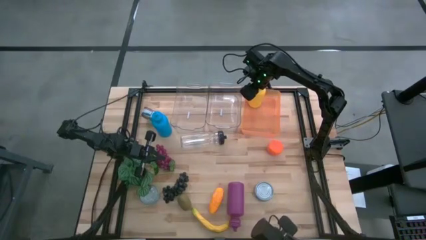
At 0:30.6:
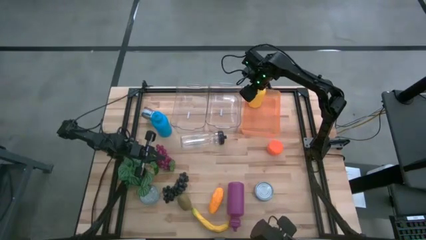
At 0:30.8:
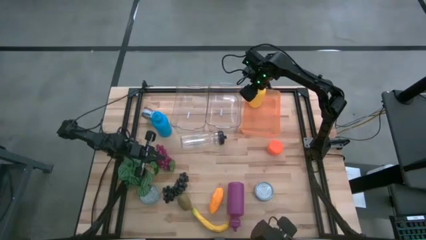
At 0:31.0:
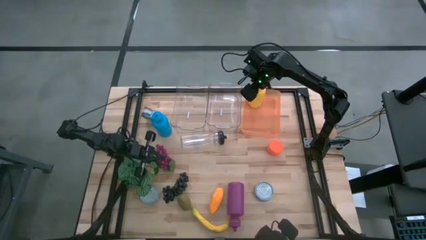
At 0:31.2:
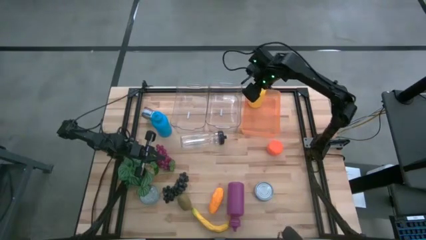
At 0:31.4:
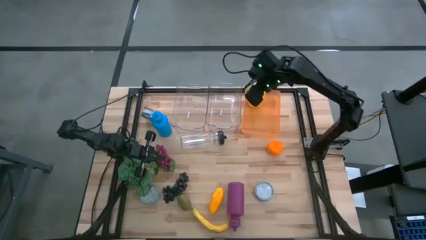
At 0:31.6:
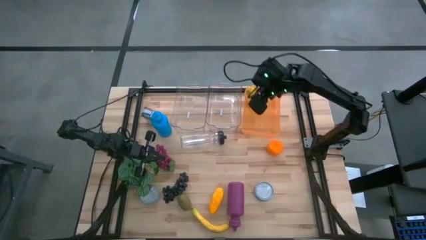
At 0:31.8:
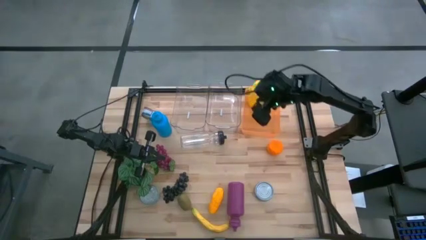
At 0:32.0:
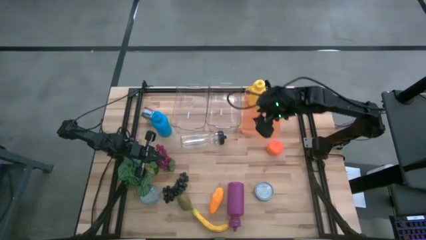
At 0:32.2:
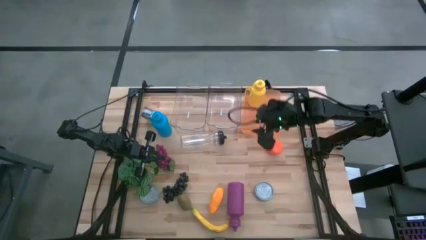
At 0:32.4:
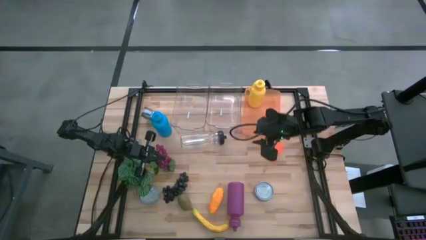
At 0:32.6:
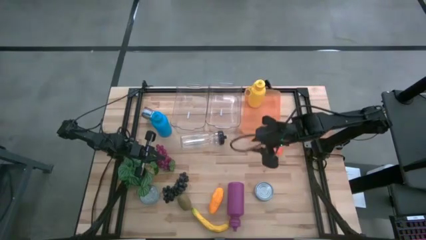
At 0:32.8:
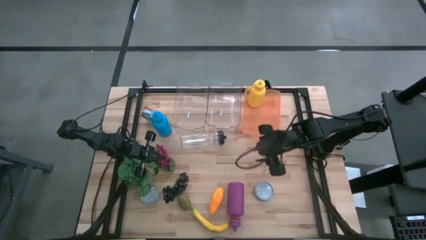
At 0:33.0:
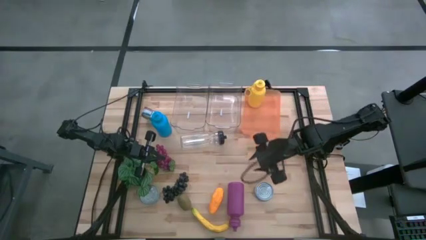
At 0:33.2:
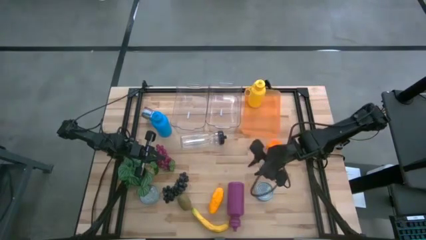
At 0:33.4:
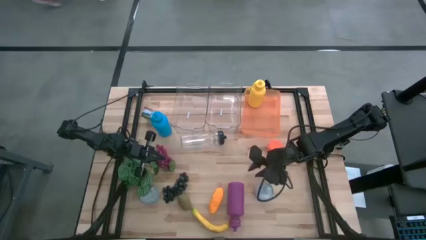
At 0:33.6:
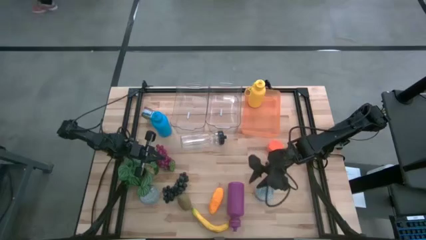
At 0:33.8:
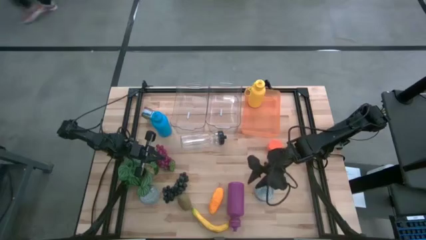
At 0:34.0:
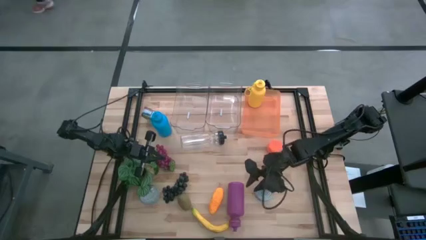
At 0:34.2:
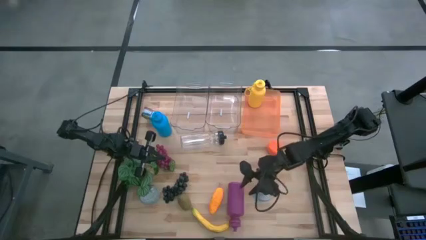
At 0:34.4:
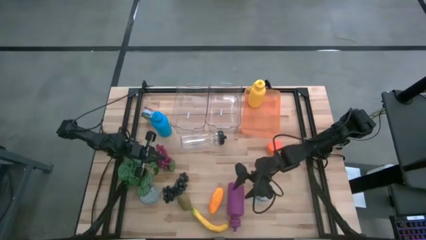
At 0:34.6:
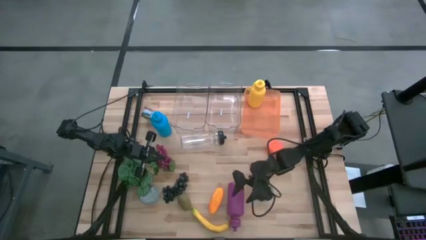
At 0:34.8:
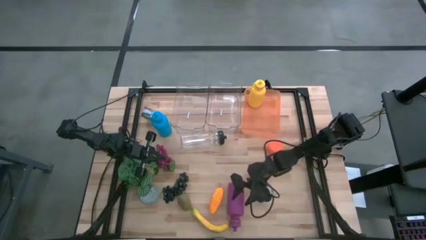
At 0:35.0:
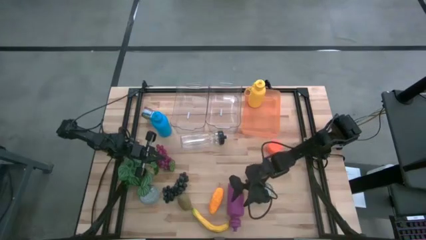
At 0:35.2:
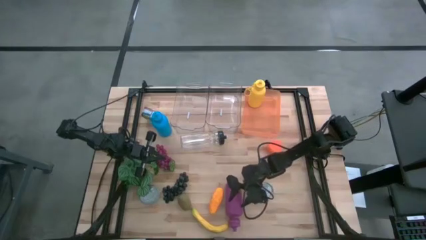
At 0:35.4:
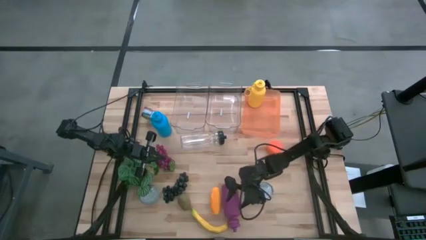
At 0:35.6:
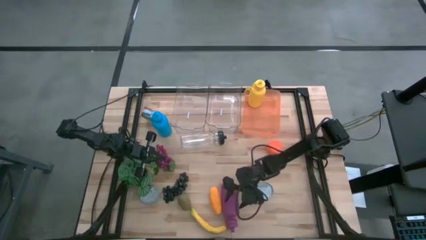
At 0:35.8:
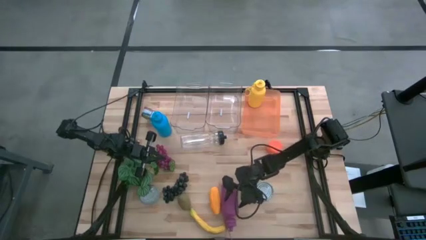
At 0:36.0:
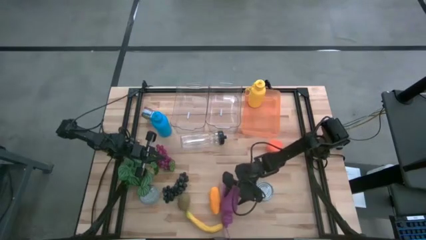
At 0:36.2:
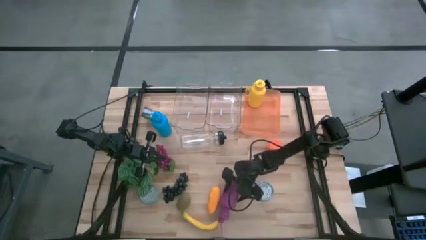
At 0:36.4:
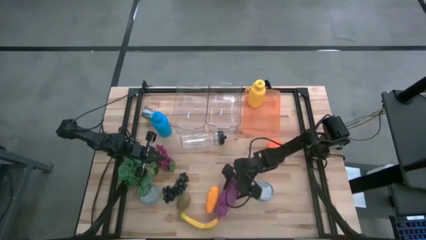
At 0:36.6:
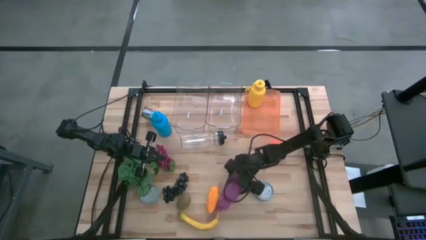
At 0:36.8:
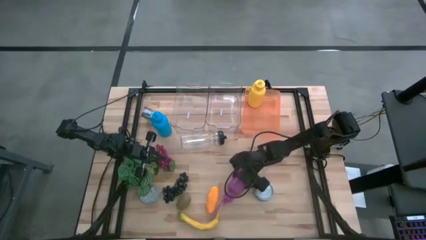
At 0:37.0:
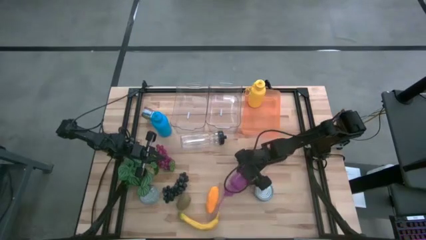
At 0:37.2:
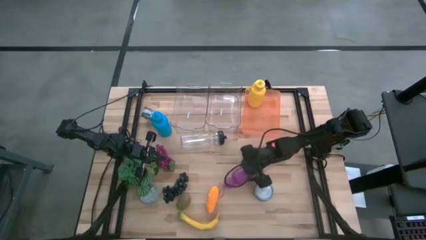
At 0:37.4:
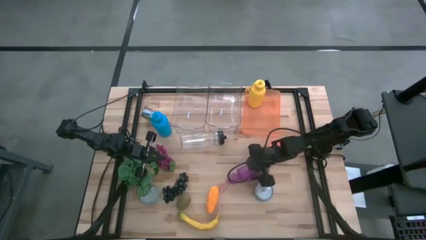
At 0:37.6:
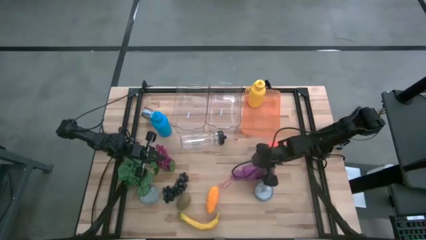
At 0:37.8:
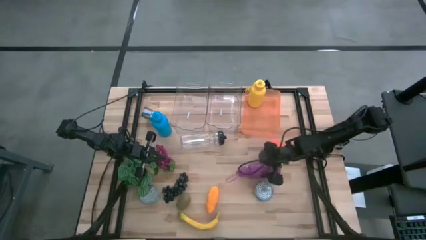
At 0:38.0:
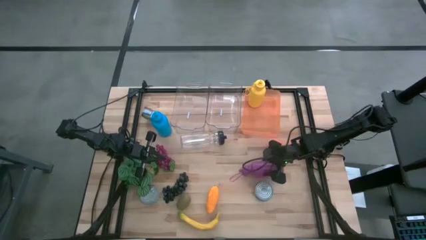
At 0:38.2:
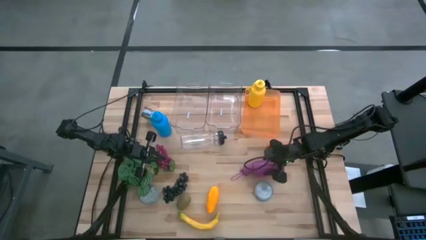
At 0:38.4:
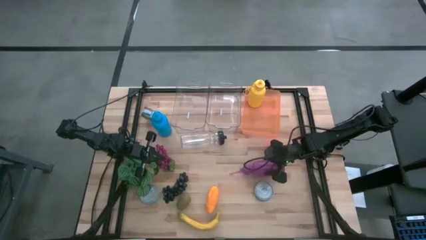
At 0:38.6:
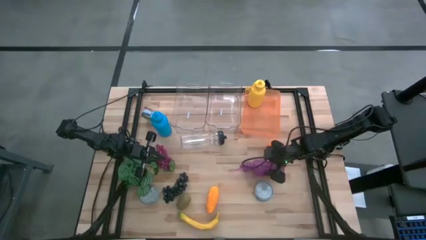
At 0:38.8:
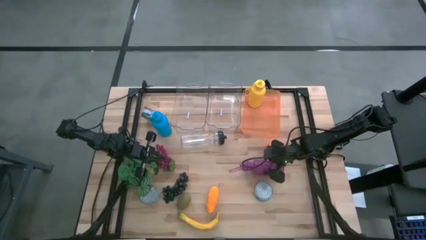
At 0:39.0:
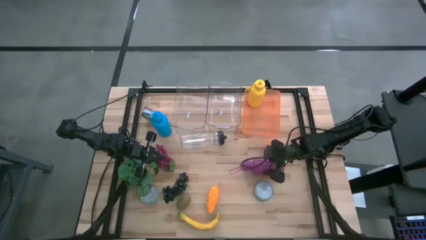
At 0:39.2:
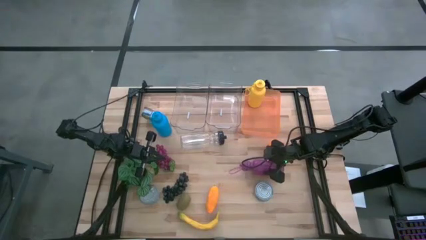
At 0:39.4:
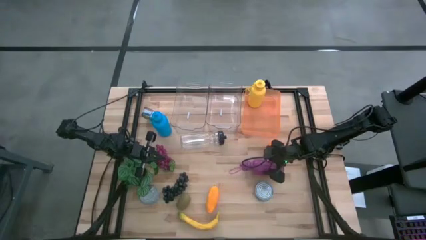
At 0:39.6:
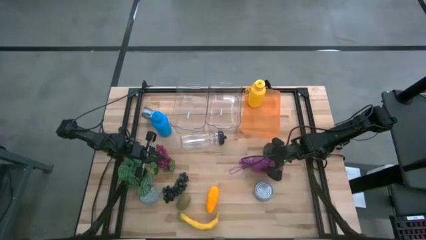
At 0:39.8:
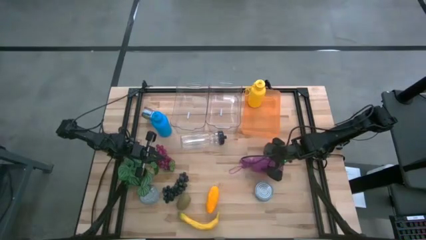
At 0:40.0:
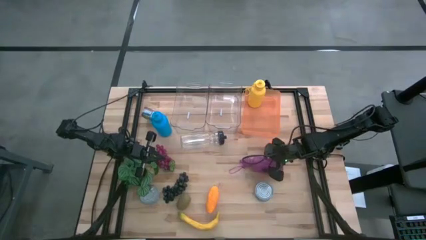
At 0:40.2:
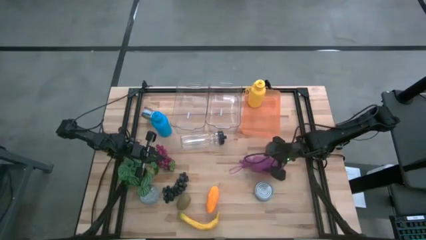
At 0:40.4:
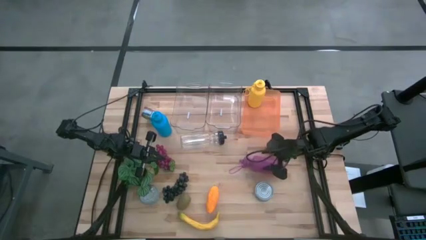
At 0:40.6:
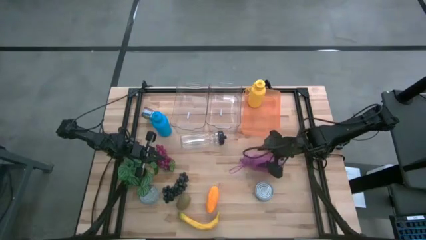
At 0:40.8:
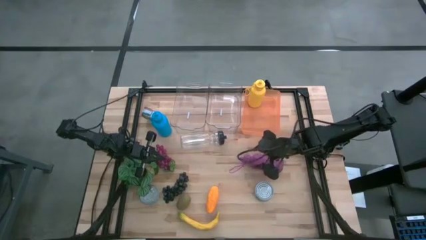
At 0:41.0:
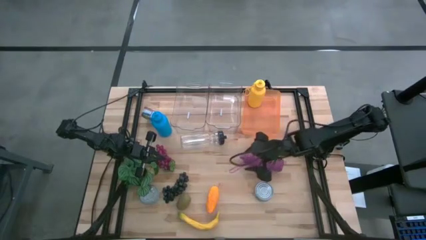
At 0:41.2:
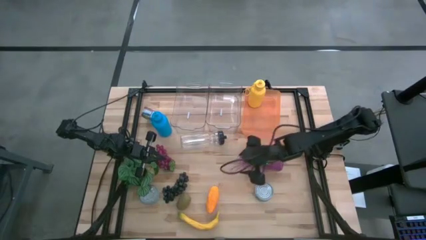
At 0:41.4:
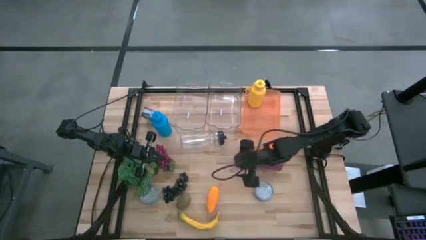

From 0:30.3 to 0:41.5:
Task: Pick & Place Food Item
Put the purple water bottle into the orange bin
